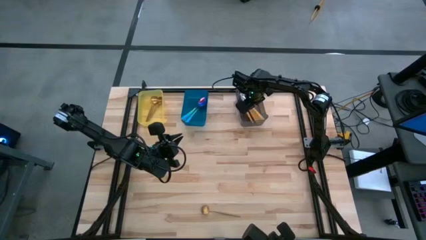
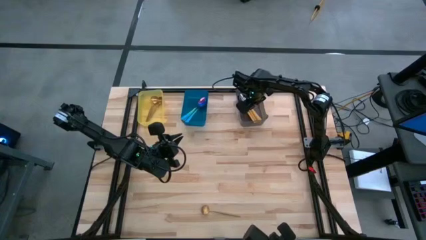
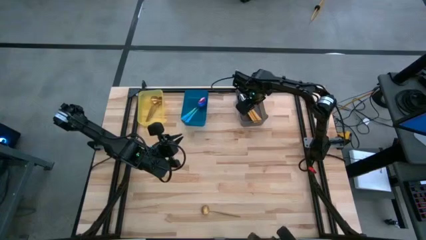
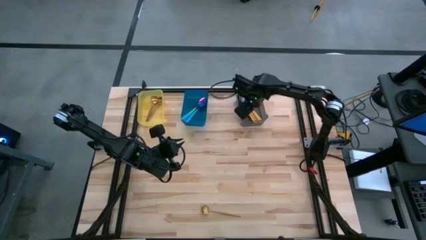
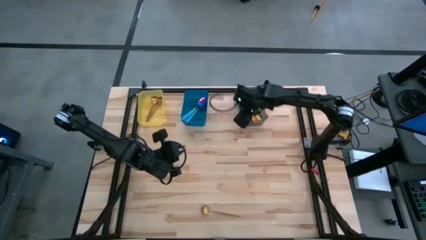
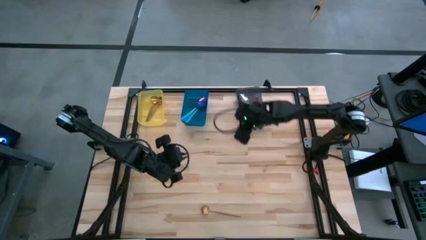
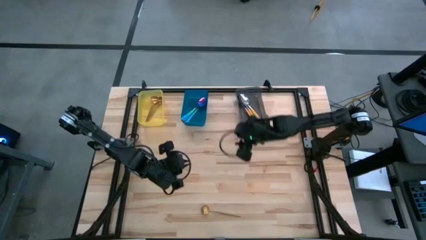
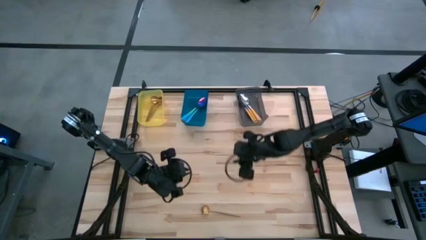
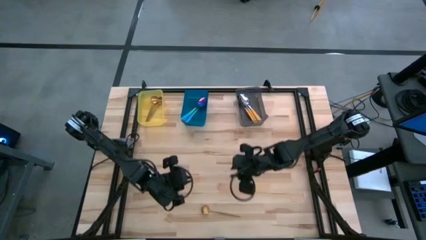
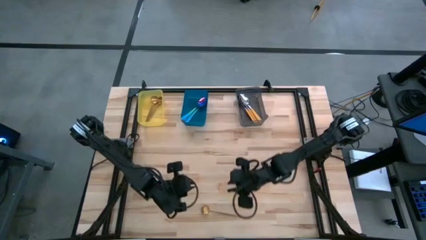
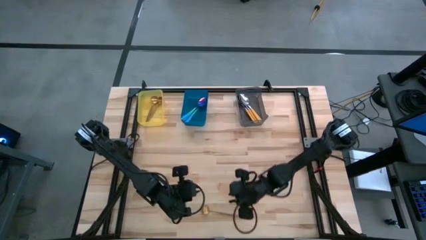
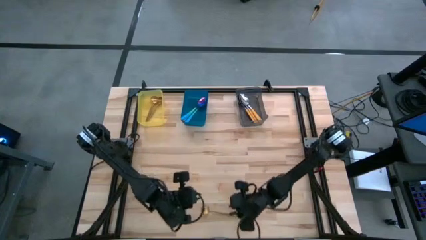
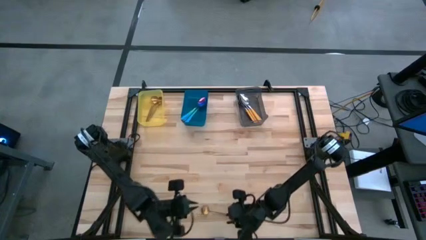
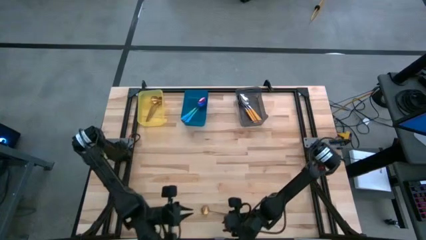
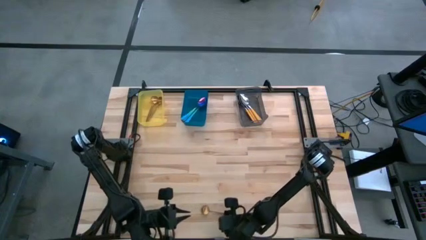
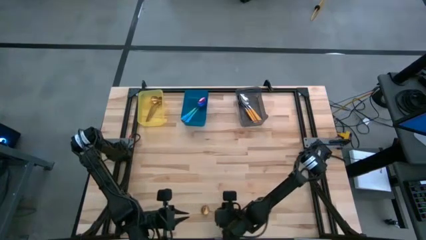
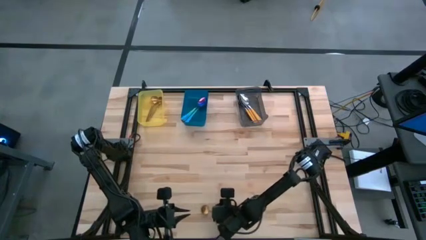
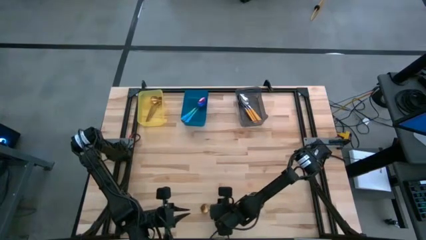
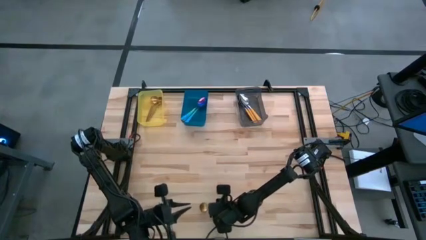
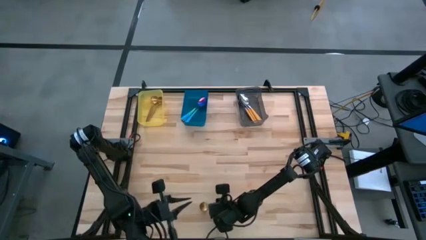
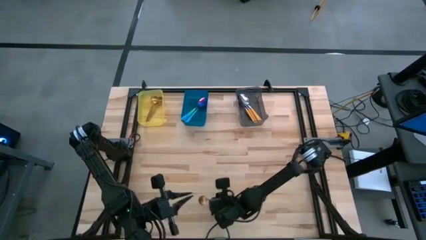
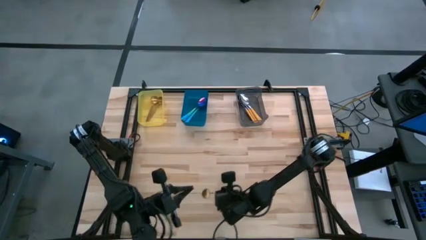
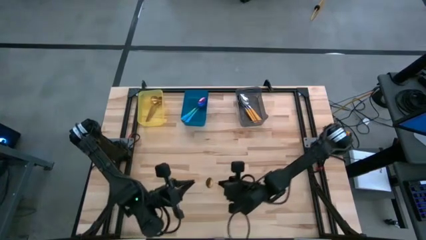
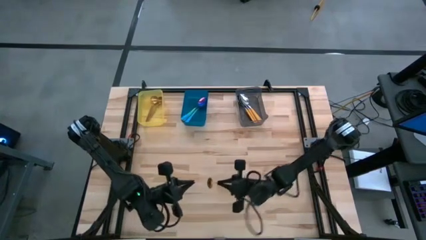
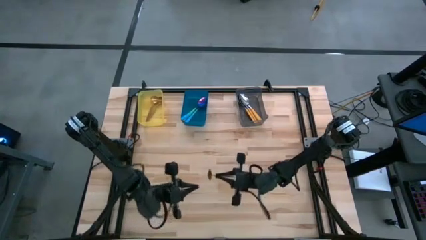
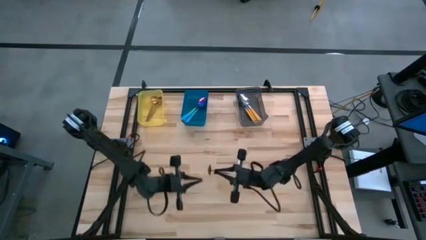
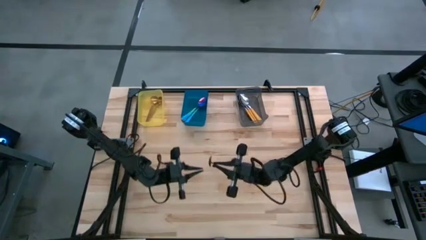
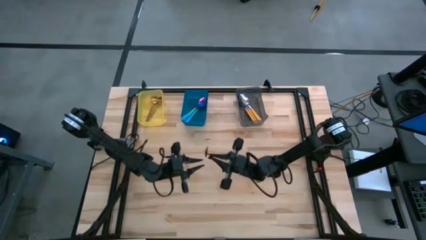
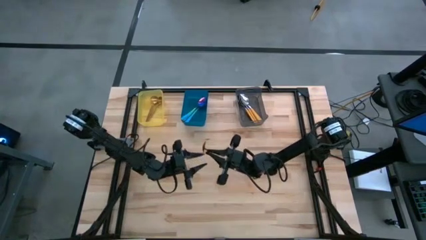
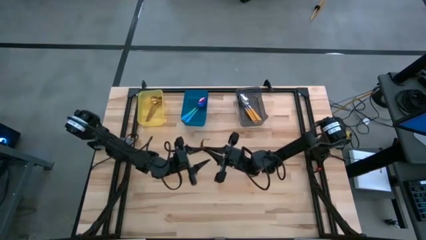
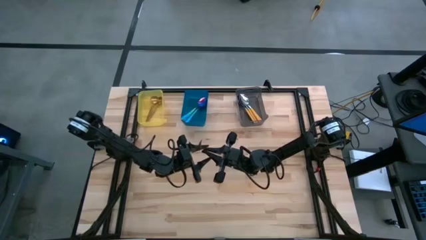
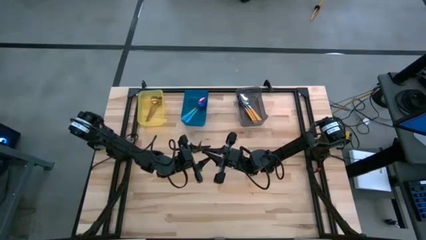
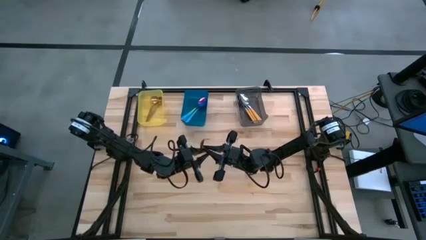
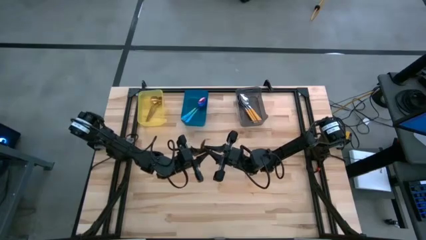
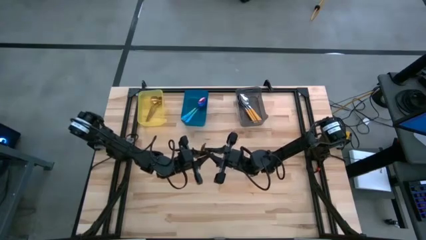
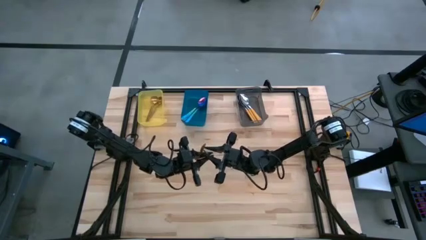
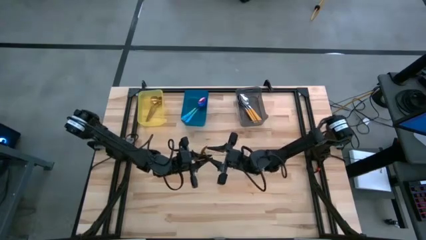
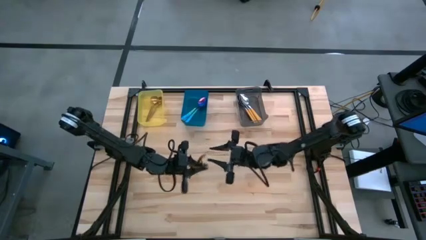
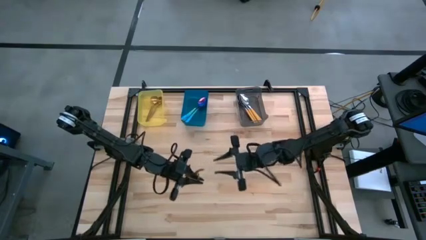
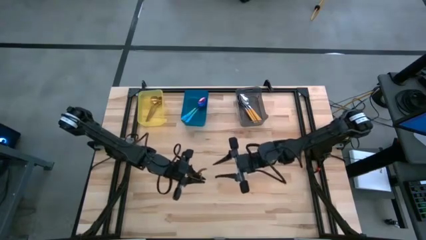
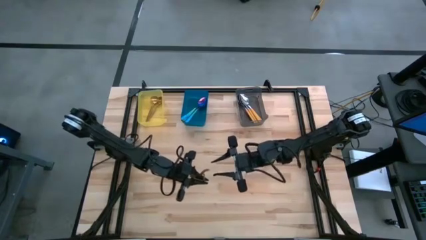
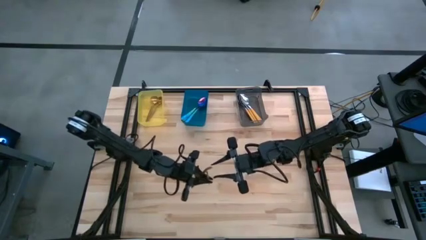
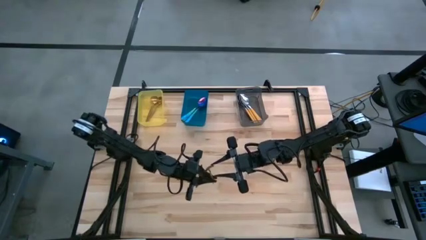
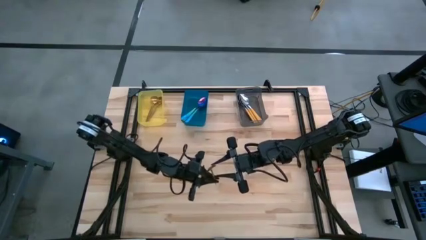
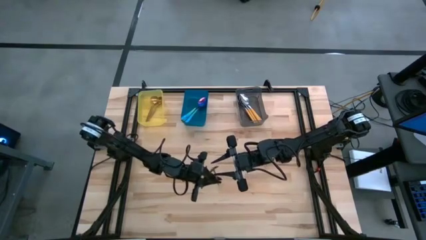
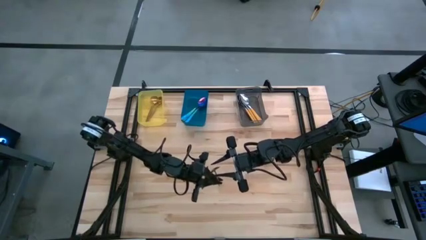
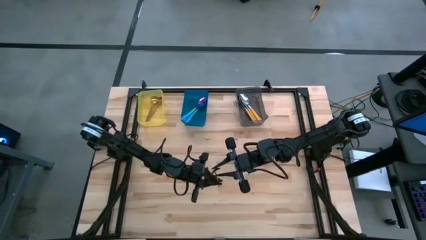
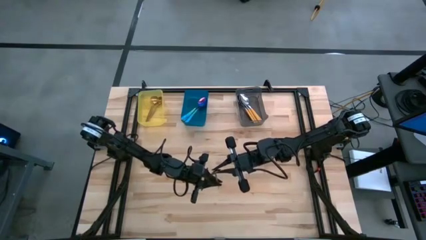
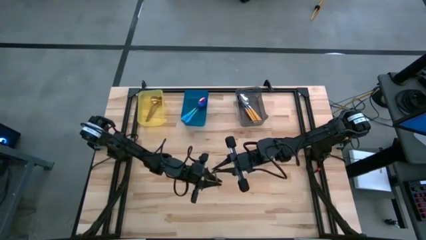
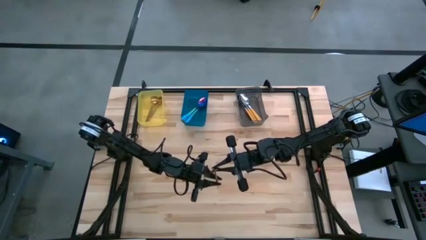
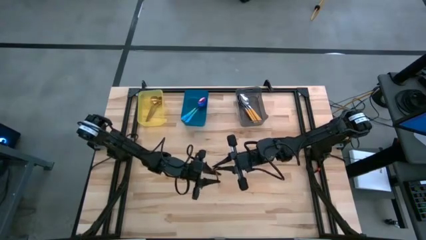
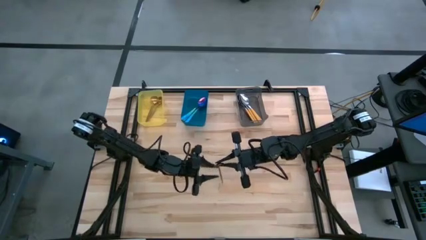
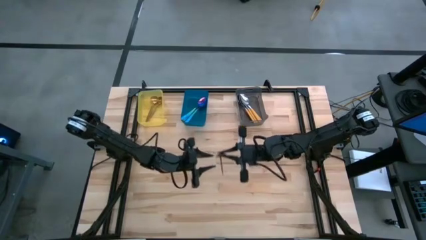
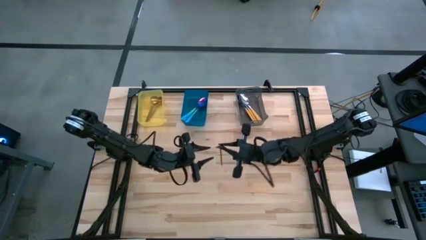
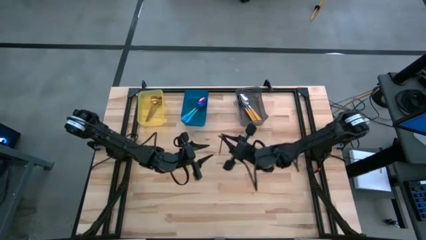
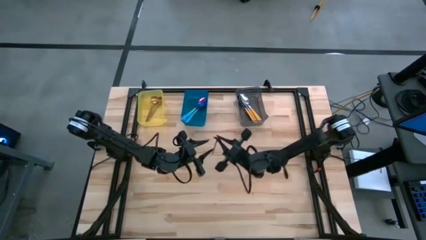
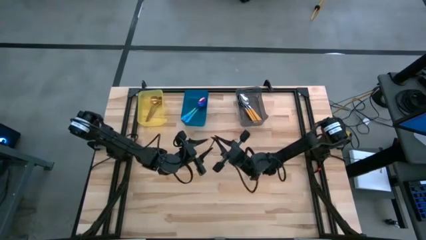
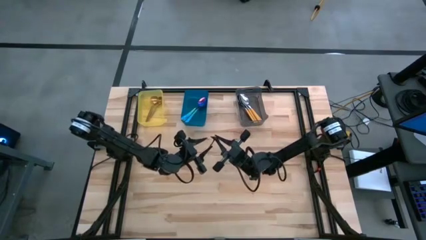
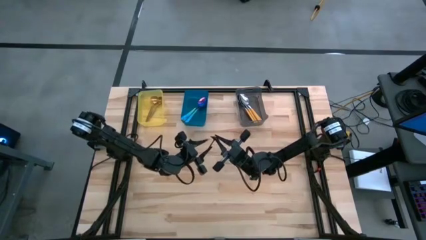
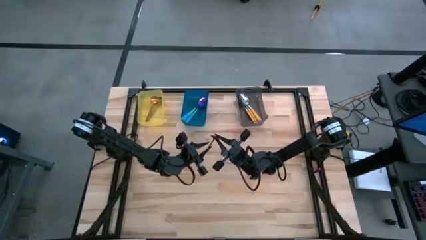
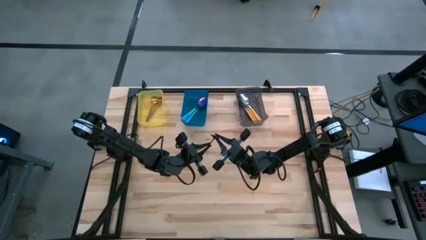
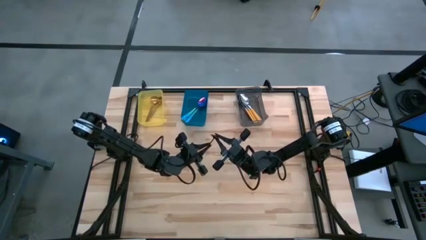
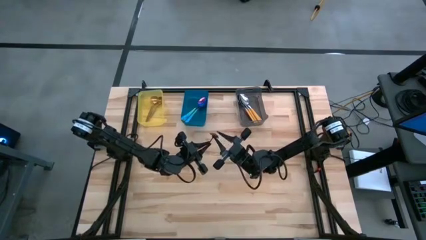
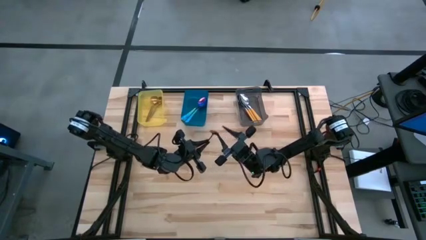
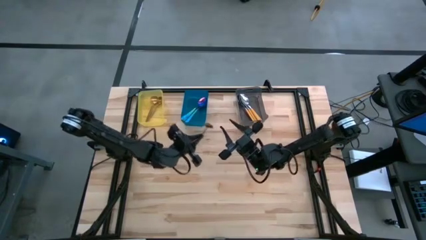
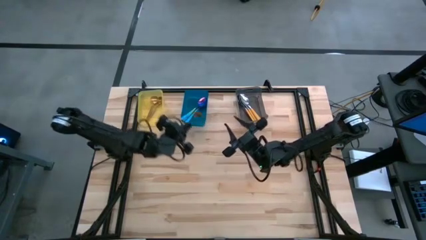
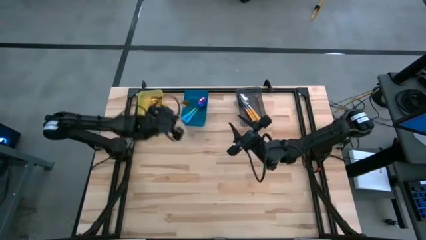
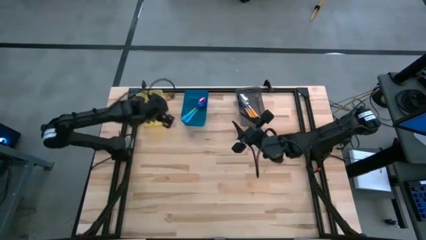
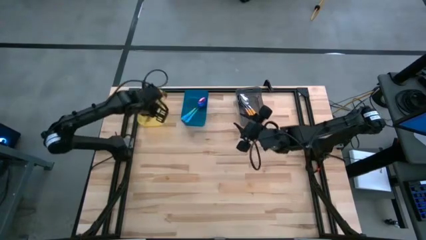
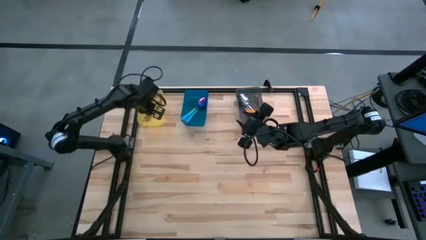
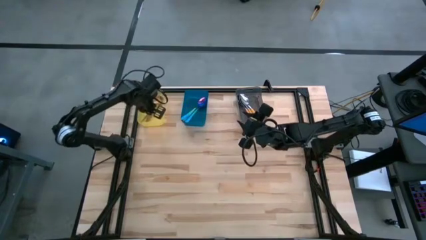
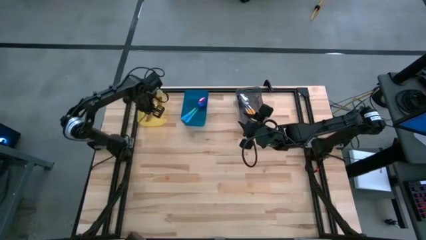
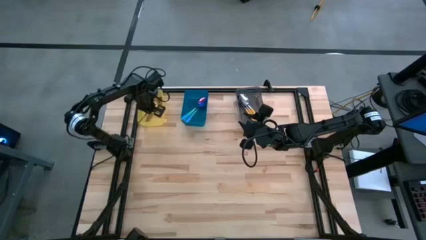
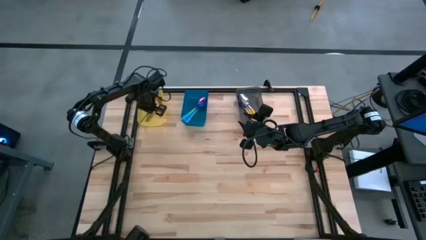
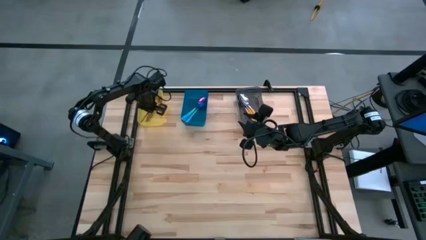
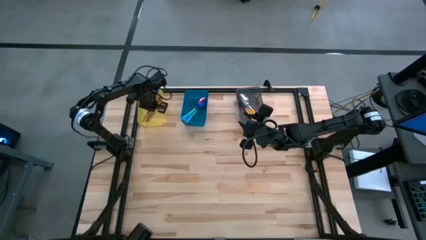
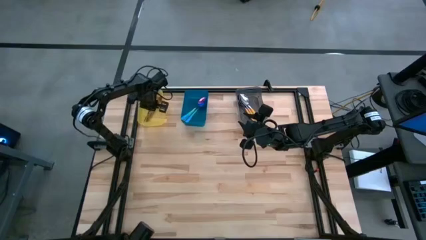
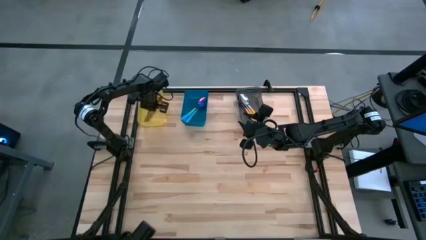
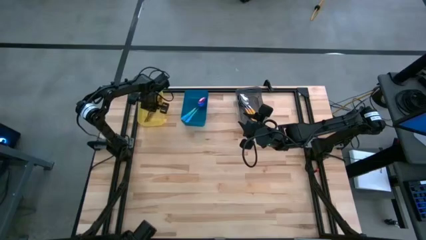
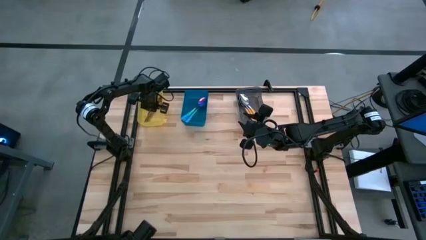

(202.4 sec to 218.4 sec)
Task: Sort silverware by color (type)
Put the gold spoon into the yellow bin

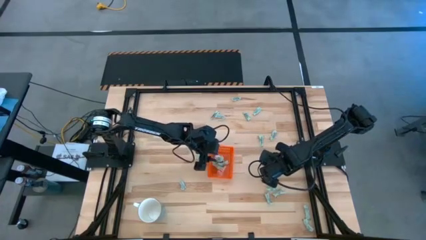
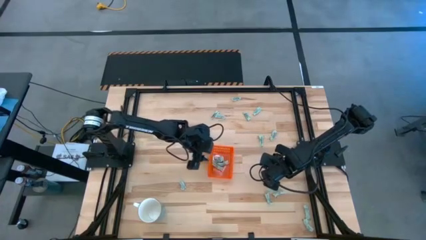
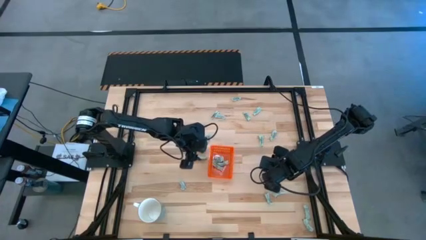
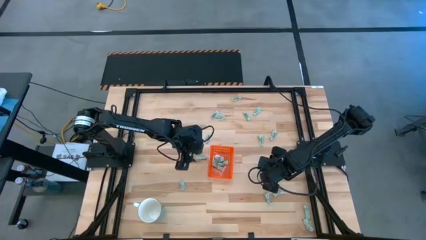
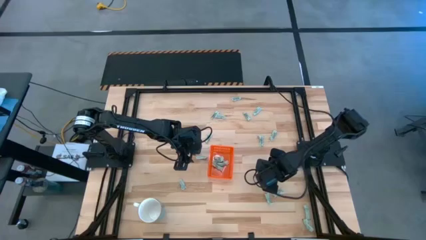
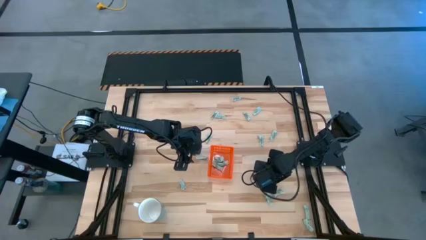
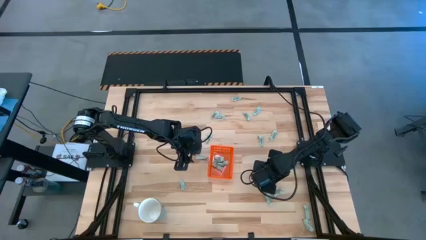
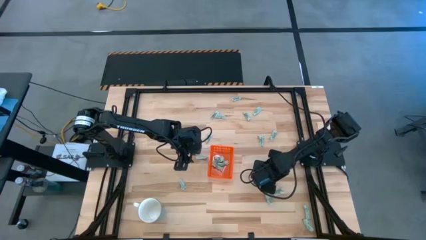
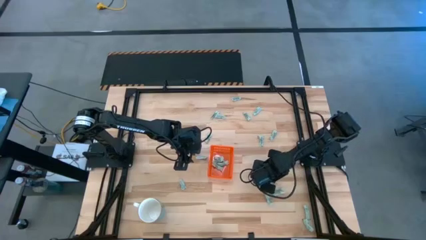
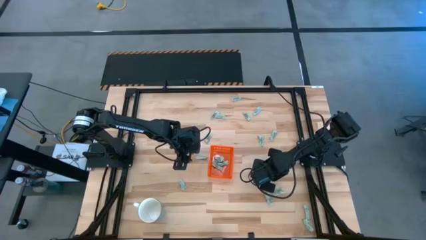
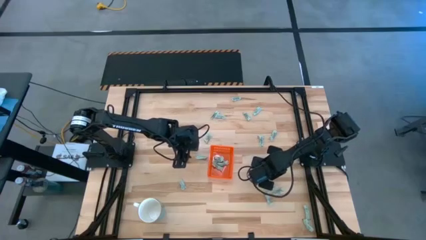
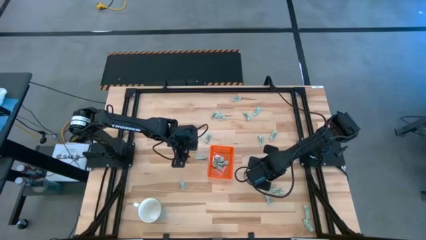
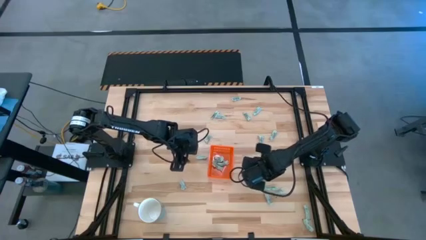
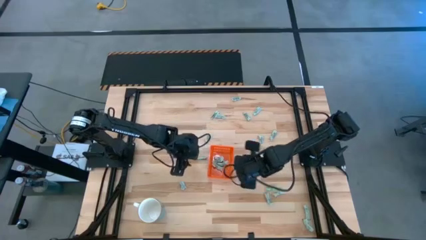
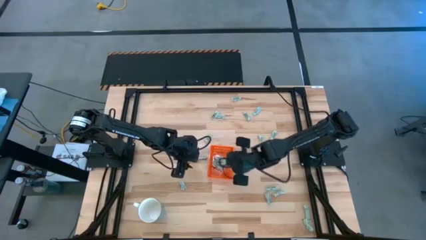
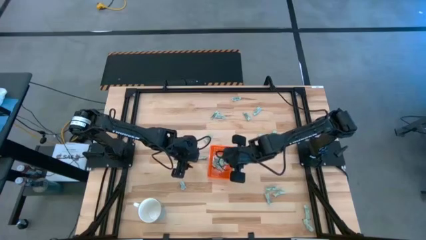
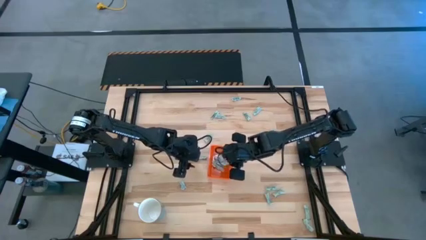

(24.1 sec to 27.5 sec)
Task: Pick and place Stevia / Truvia into bins
Put the stevia packet into the orange bin
